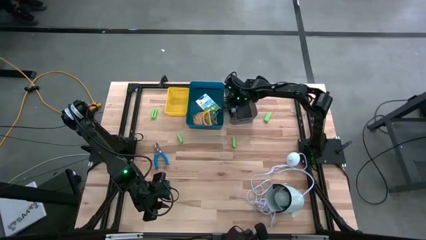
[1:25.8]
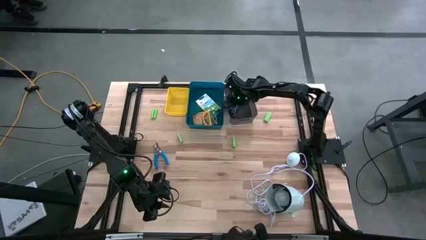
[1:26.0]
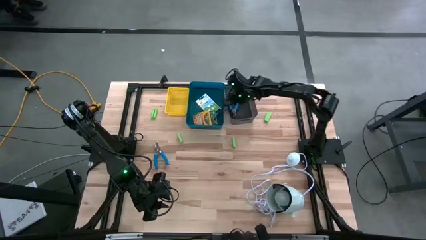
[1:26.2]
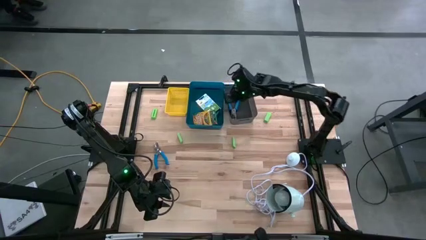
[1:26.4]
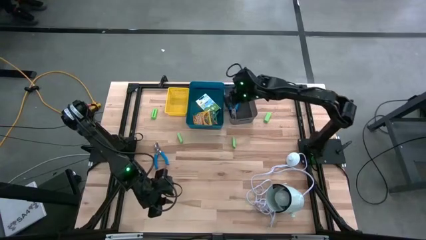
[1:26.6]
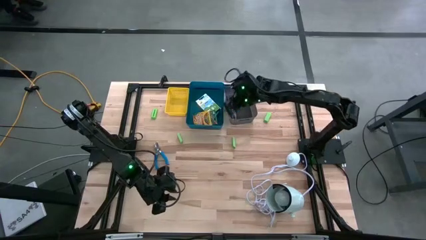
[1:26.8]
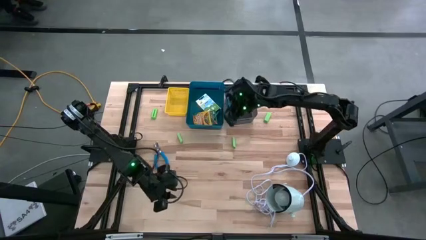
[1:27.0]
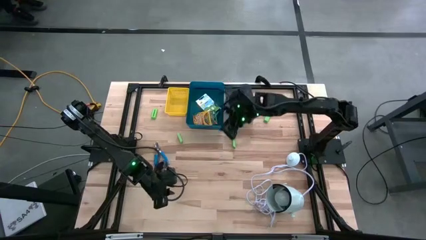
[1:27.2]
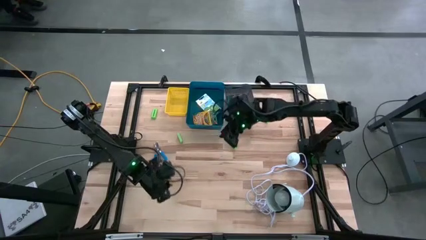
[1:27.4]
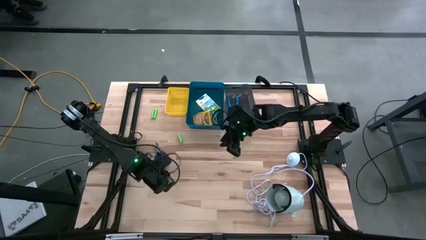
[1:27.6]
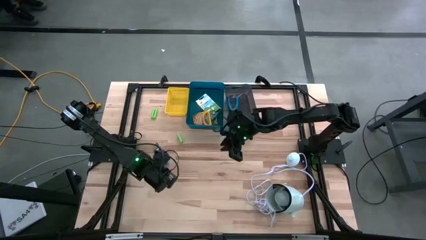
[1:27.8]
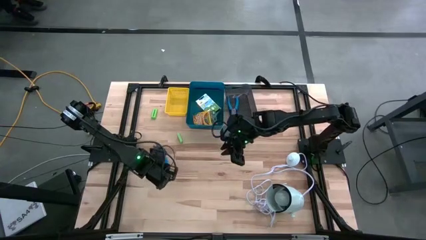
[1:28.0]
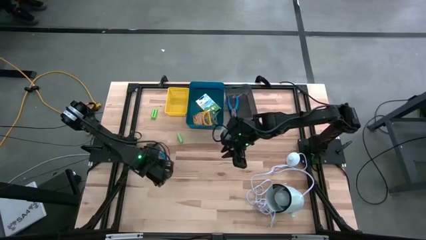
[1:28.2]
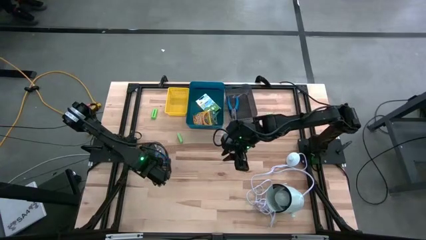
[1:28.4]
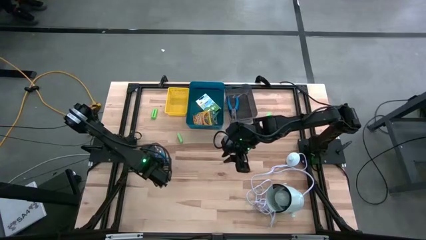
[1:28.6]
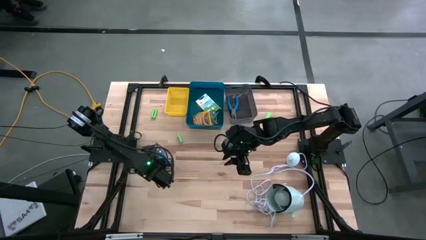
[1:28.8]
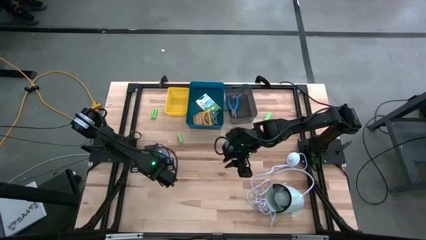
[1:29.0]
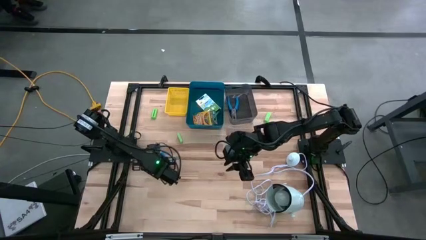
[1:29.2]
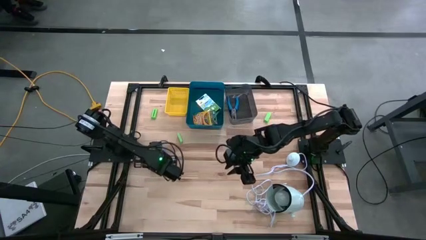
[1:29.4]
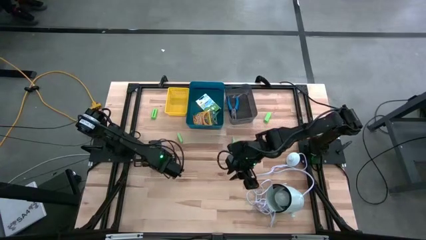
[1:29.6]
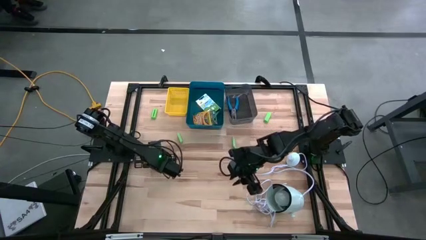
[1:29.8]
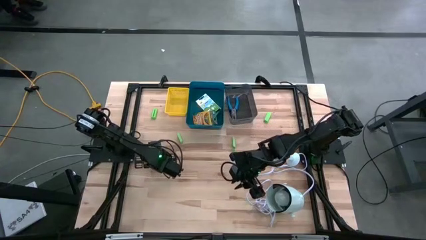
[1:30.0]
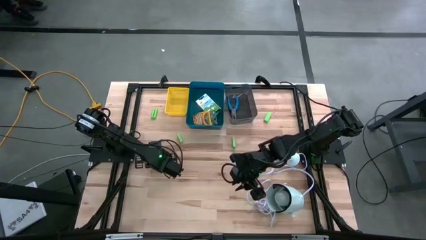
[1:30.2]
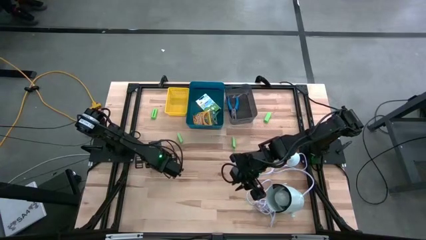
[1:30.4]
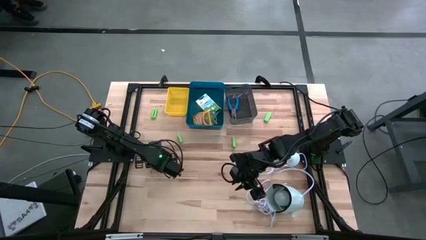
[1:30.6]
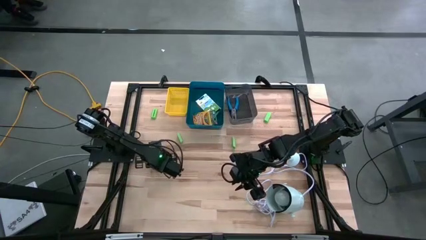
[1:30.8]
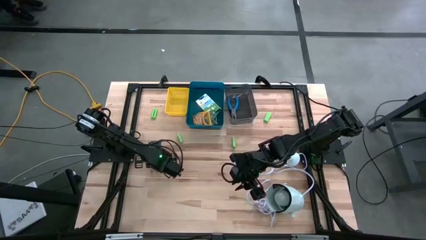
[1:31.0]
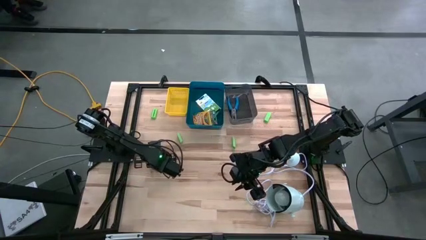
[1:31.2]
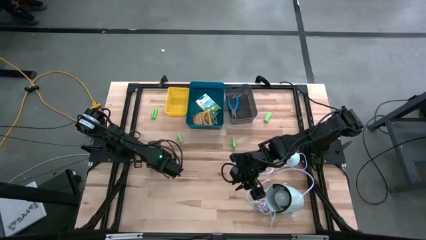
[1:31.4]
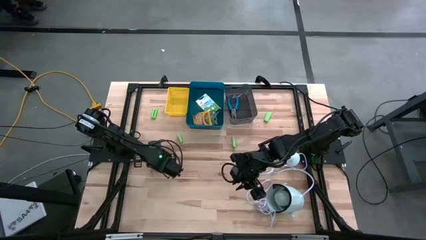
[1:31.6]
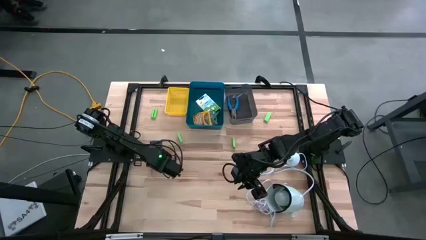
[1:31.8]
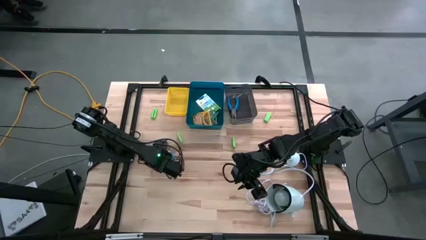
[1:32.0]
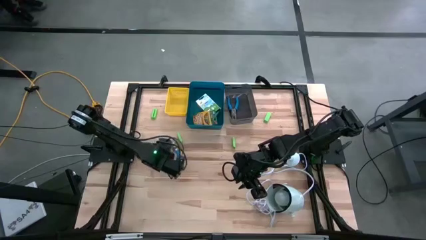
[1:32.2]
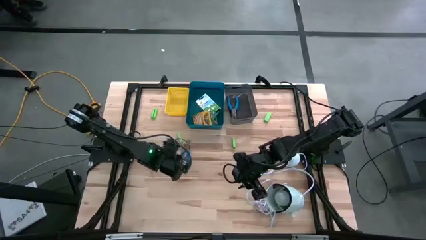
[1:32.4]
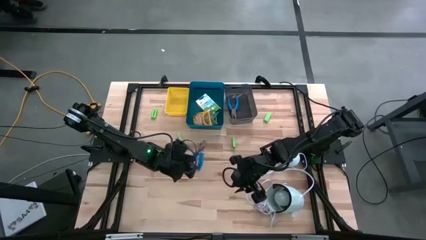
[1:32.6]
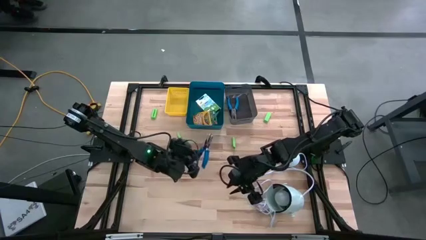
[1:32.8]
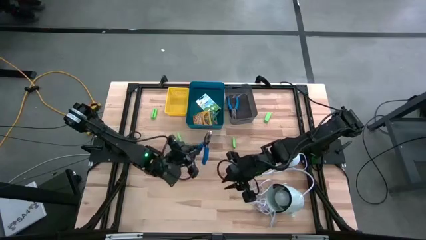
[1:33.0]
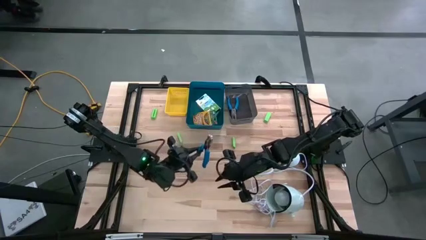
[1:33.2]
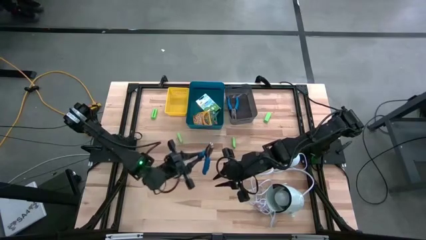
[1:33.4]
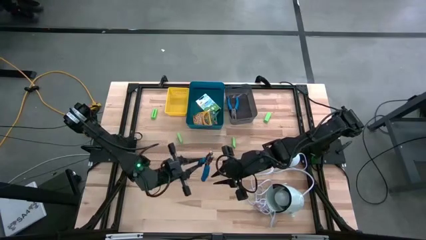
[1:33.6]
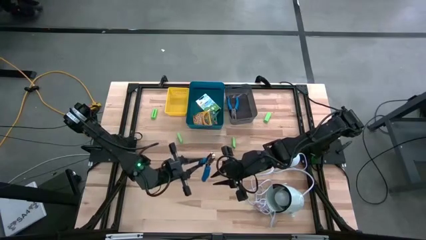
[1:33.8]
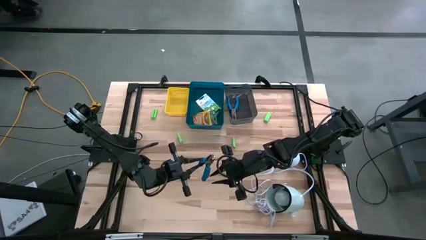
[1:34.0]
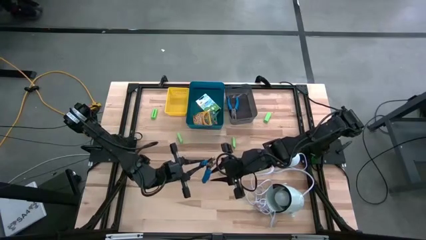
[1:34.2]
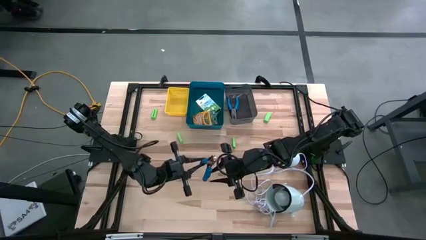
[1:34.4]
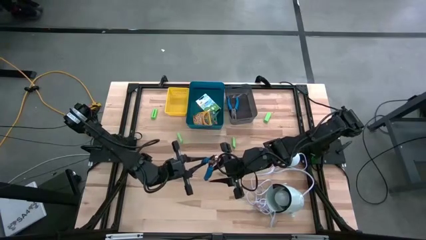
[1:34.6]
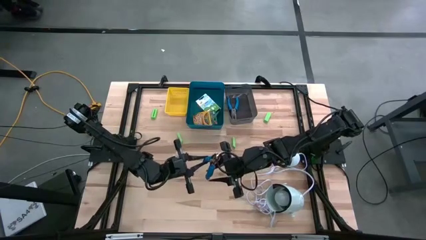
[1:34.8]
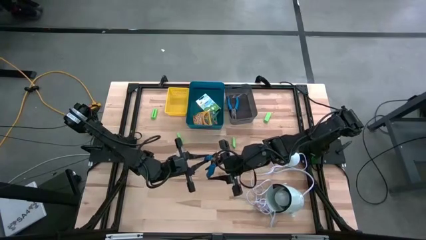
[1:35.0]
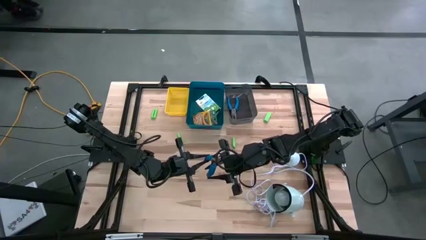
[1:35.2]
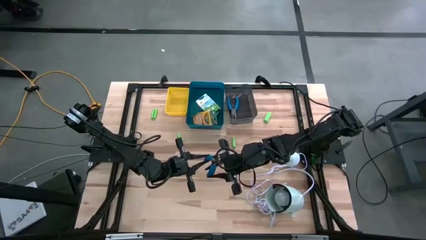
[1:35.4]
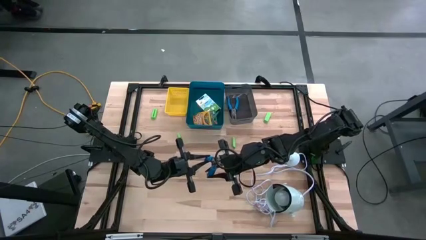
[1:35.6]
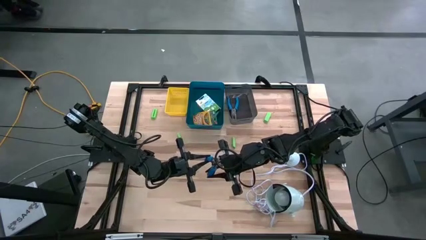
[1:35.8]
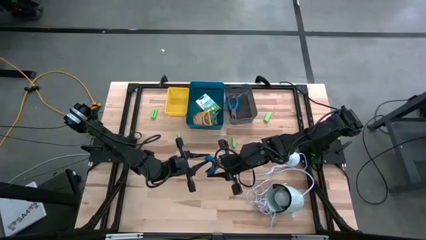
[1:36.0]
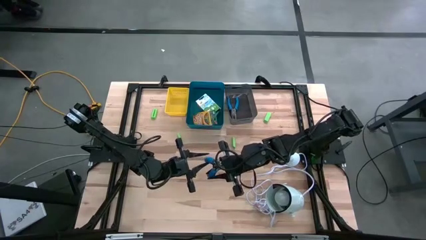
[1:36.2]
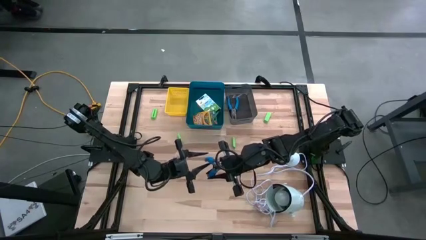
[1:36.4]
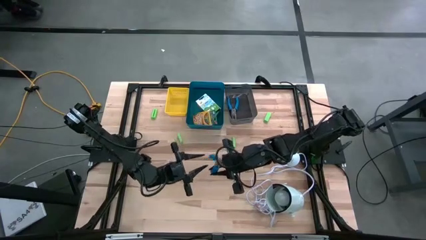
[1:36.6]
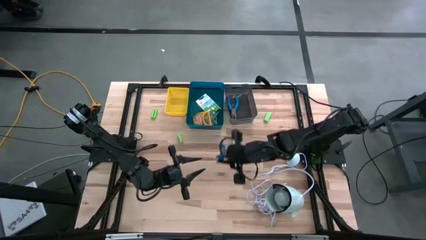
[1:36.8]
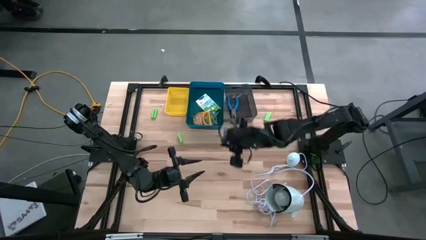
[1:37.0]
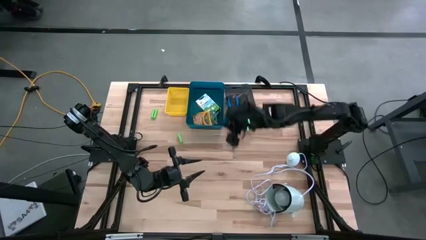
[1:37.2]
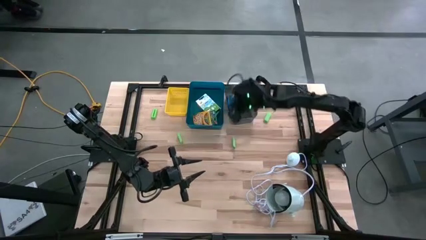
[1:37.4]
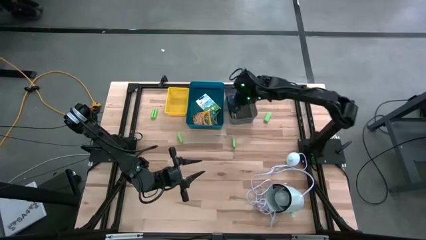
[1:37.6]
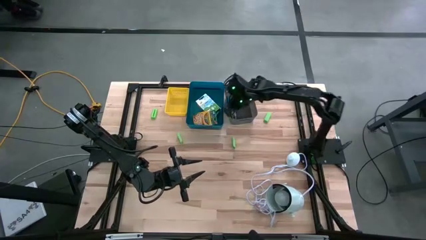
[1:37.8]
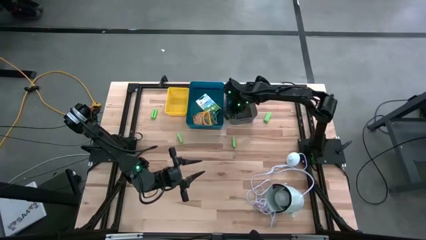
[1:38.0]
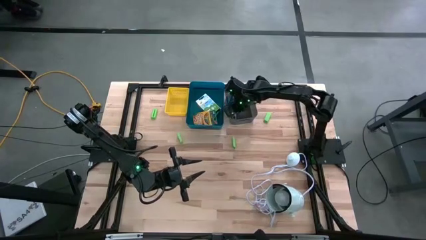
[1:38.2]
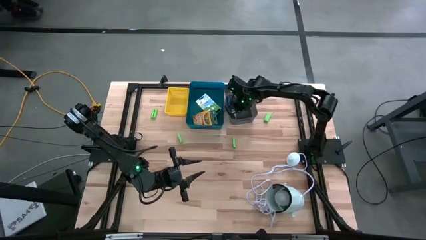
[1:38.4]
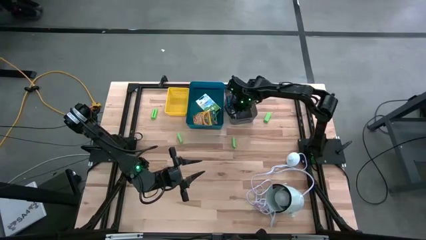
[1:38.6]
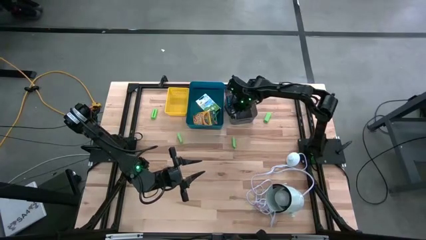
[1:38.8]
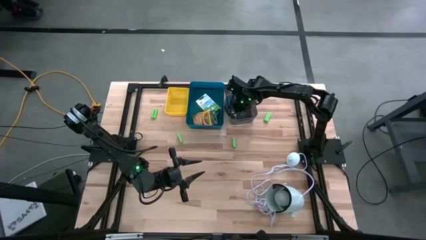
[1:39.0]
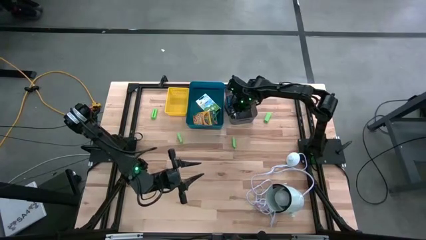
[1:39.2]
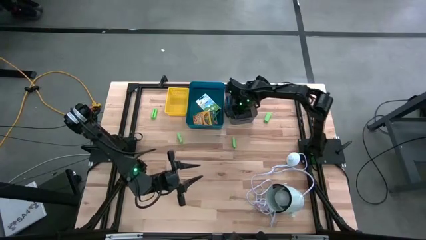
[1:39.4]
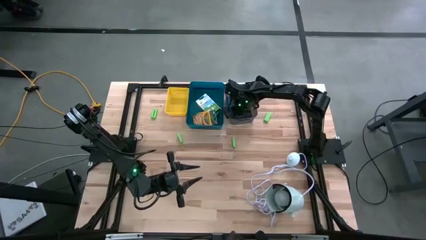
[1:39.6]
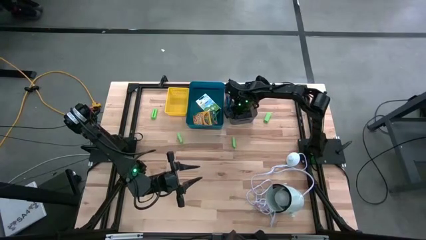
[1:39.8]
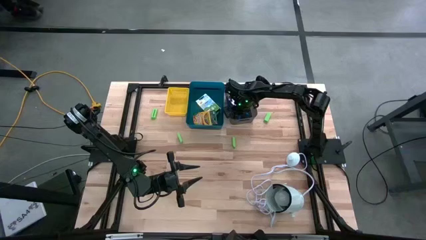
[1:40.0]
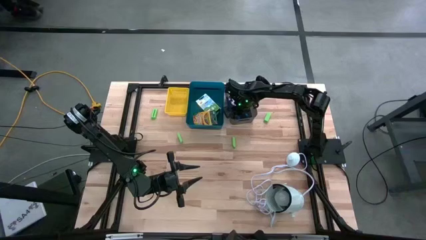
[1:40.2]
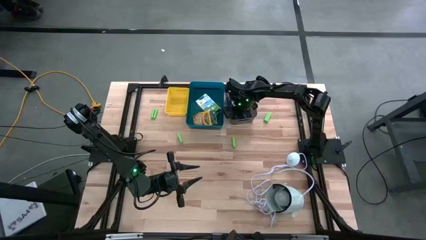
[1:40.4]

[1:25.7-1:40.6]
Task: Pick & Place School Supplies
Put the blue puncher into the black bin
